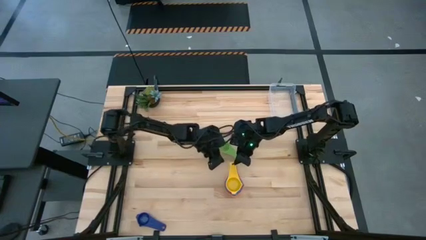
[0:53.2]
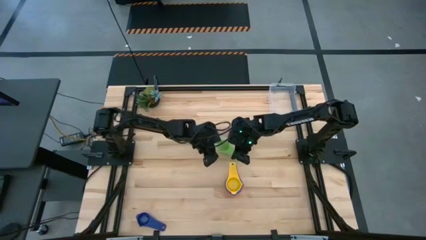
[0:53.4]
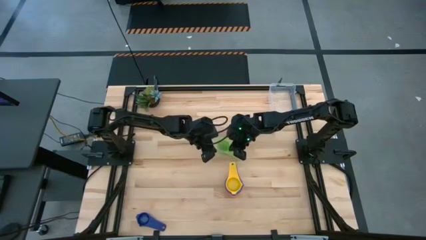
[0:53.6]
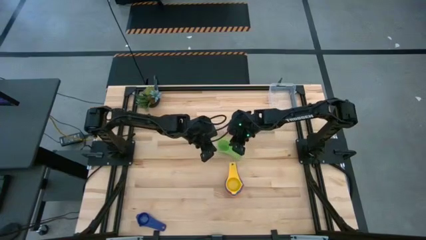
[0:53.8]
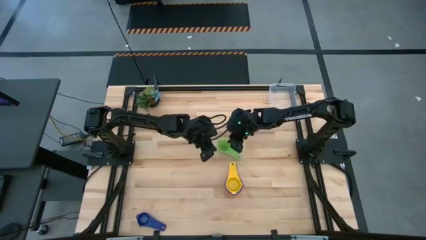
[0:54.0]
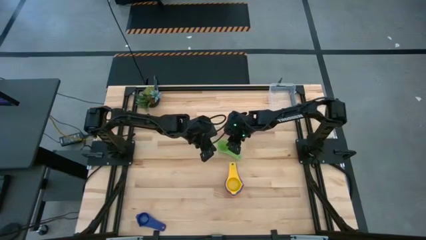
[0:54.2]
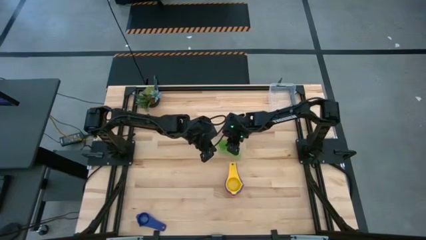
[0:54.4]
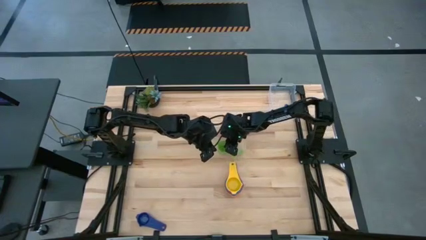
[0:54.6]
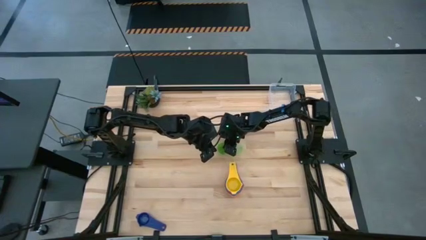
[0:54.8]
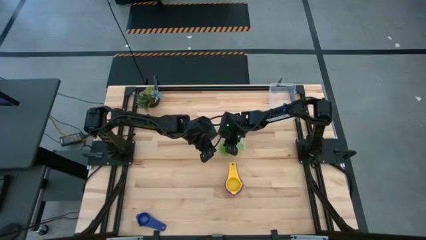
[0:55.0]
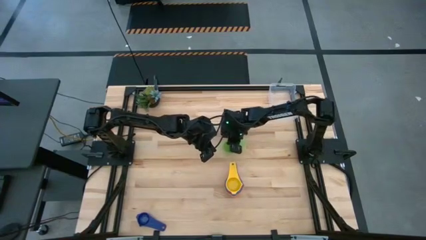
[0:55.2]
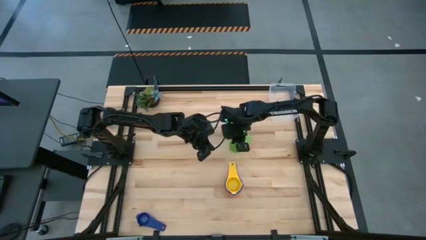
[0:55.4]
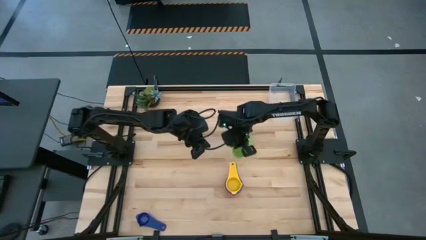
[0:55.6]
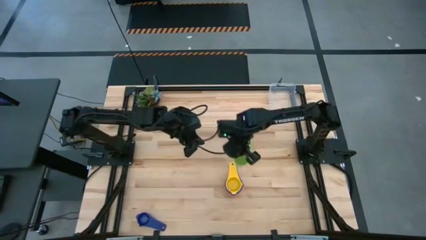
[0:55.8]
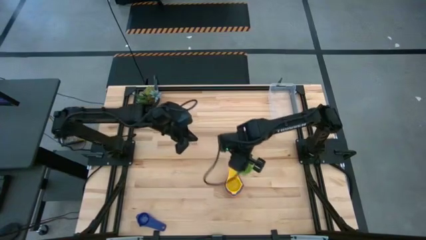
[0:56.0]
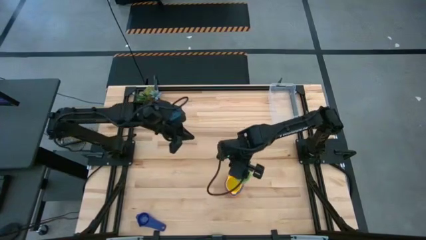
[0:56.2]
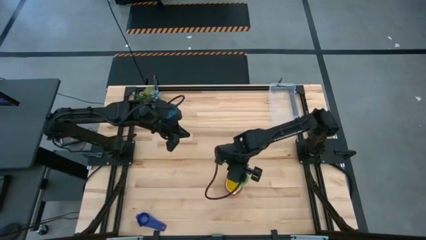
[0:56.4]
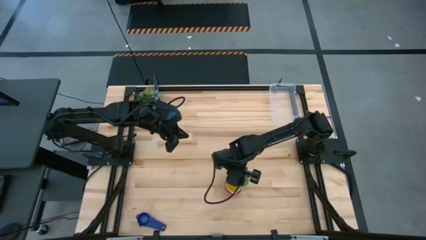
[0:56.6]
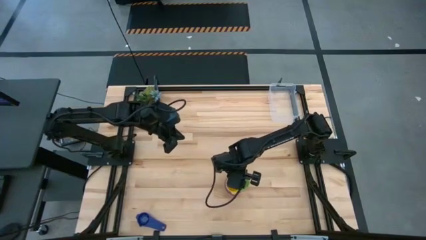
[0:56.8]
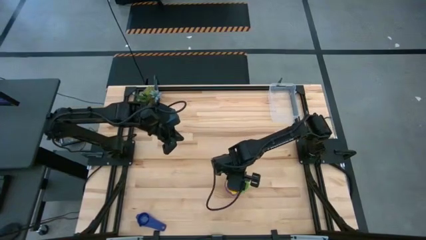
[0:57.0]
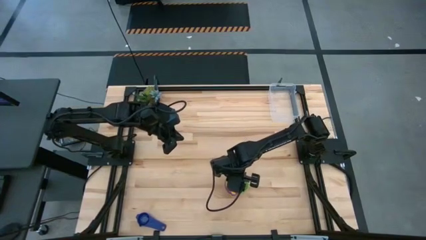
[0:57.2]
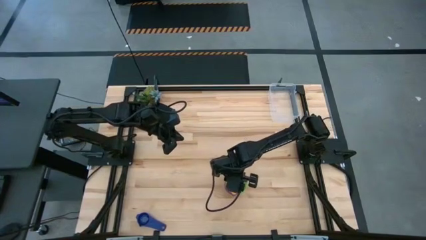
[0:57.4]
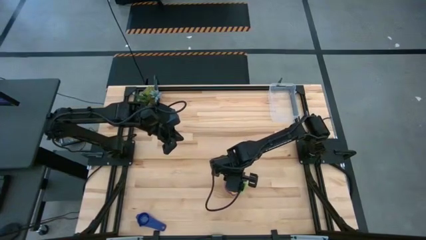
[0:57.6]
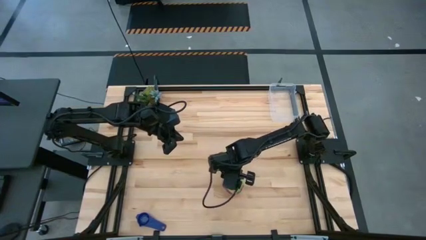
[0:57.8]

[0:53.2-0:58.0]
Task: Nest measuring cups in basket
Stack the green measuring cup on top of the yellow measuring cup

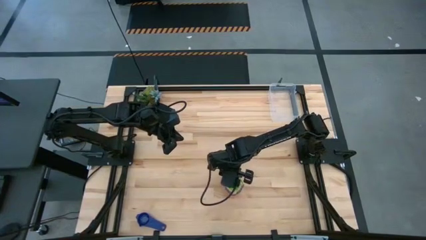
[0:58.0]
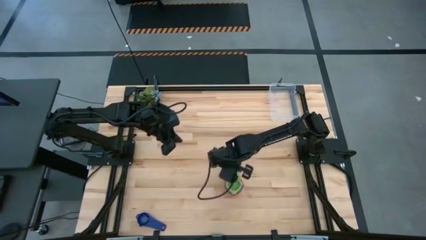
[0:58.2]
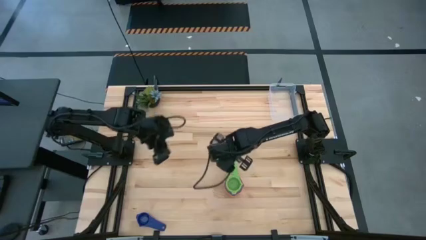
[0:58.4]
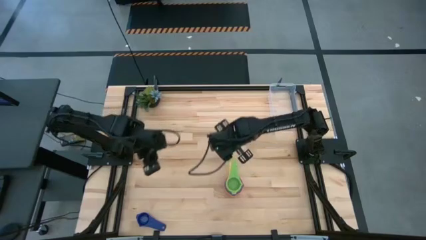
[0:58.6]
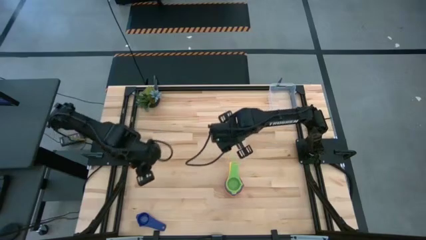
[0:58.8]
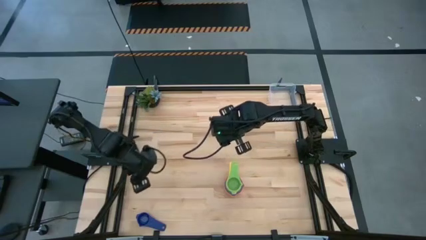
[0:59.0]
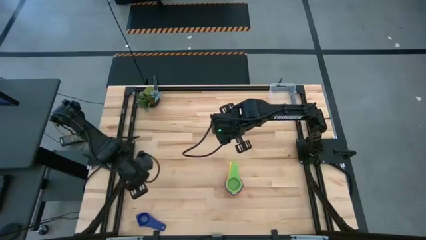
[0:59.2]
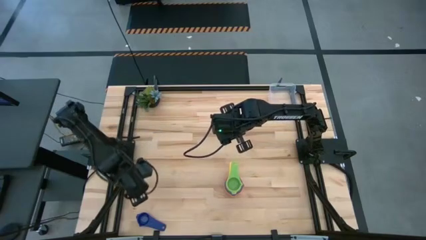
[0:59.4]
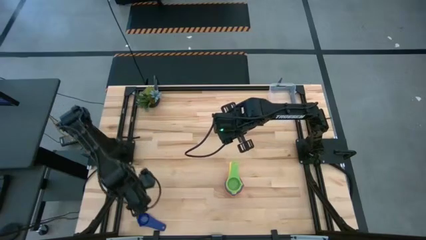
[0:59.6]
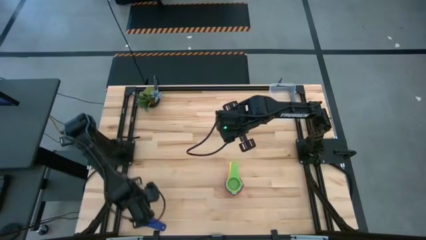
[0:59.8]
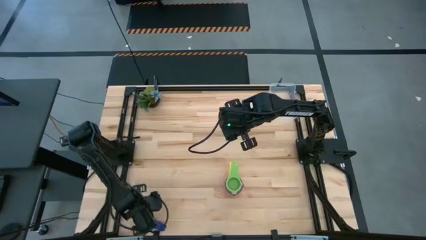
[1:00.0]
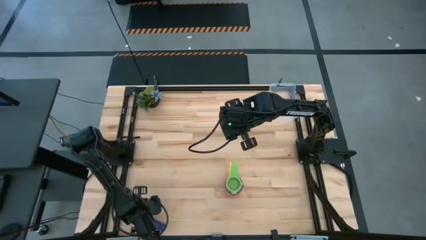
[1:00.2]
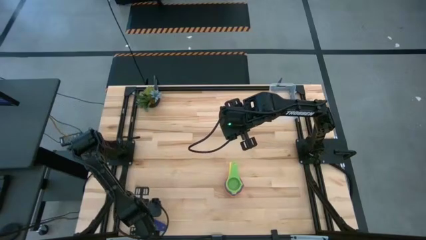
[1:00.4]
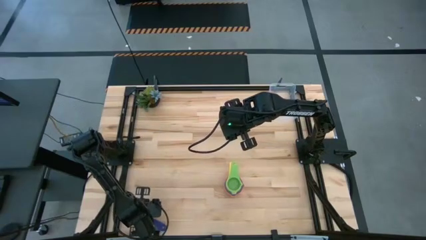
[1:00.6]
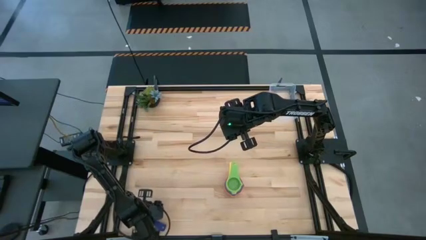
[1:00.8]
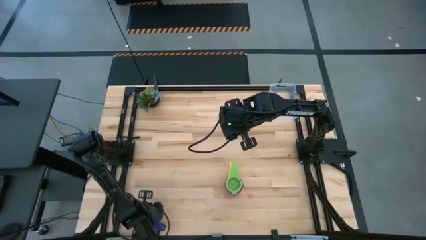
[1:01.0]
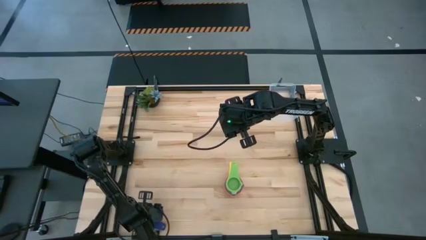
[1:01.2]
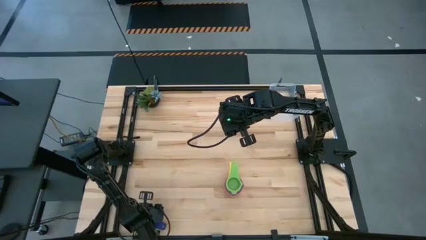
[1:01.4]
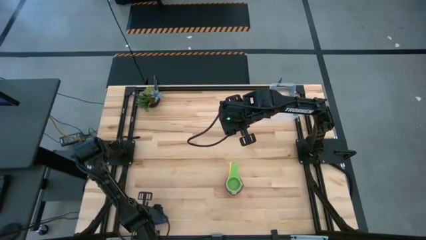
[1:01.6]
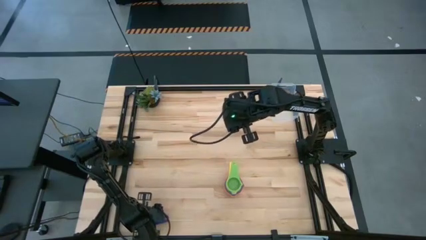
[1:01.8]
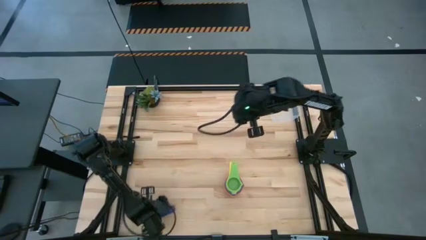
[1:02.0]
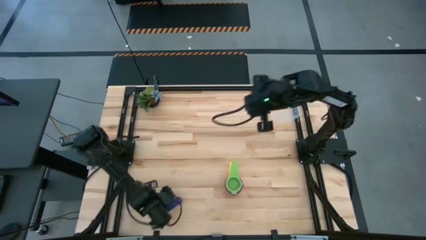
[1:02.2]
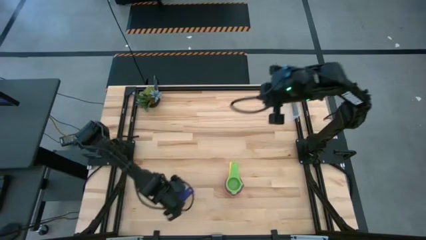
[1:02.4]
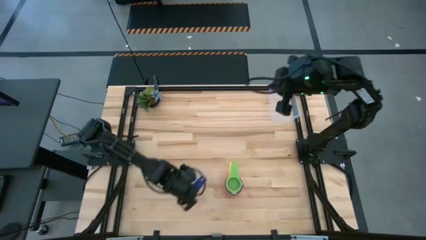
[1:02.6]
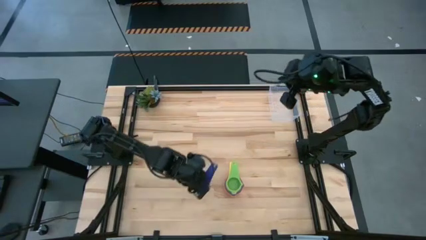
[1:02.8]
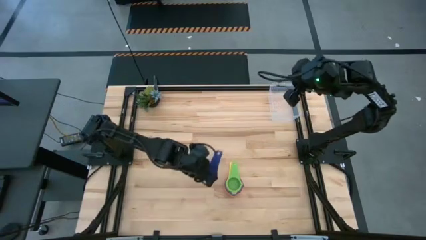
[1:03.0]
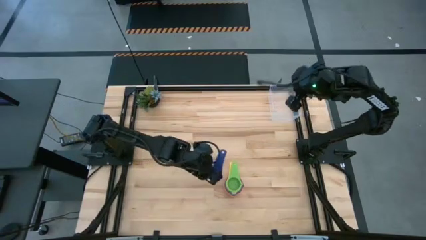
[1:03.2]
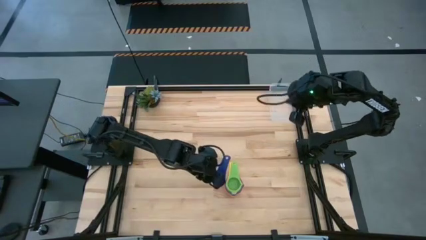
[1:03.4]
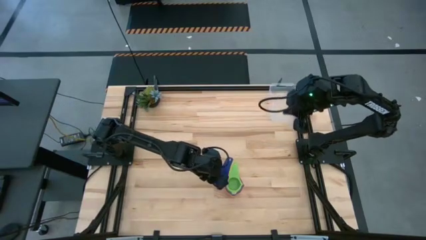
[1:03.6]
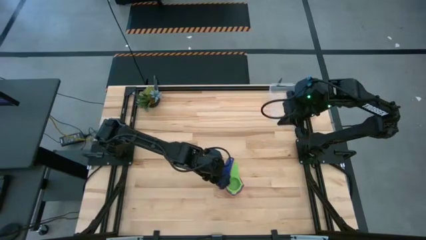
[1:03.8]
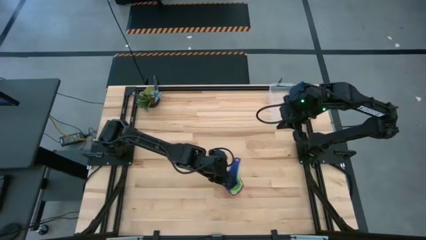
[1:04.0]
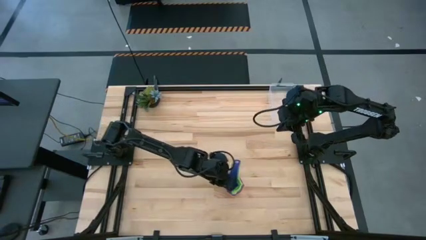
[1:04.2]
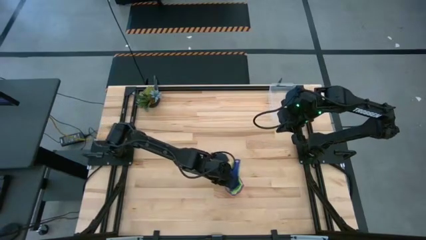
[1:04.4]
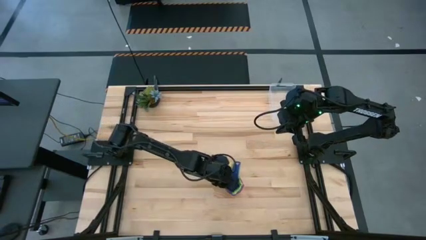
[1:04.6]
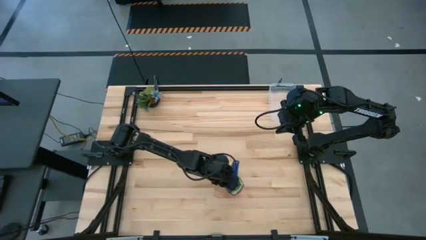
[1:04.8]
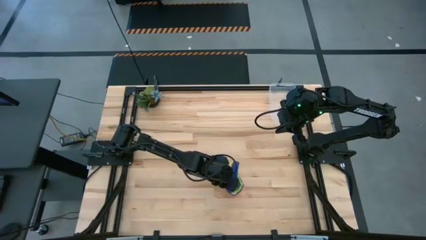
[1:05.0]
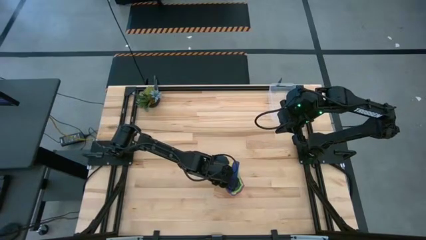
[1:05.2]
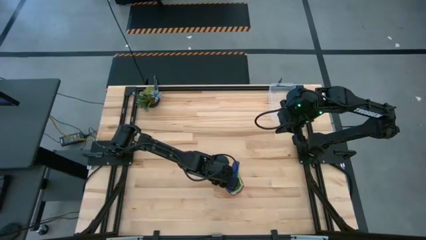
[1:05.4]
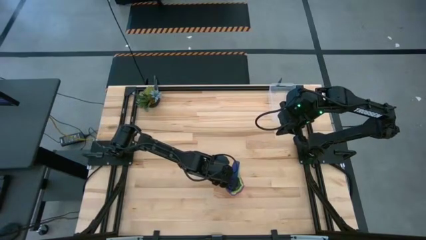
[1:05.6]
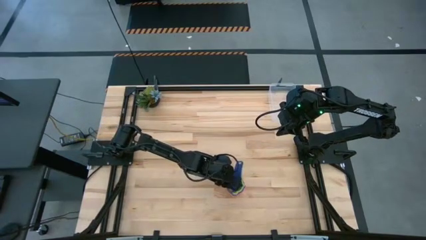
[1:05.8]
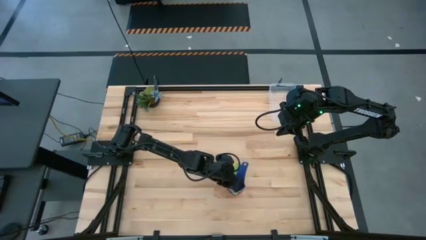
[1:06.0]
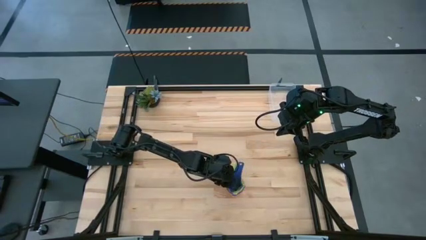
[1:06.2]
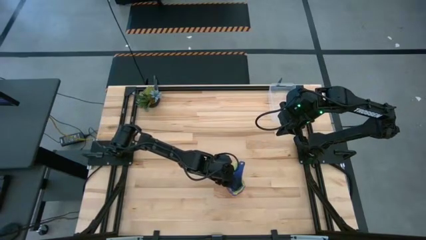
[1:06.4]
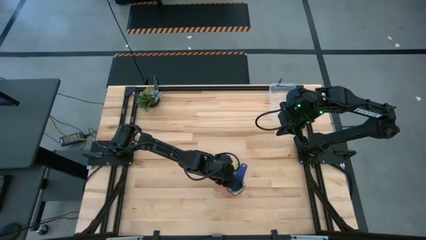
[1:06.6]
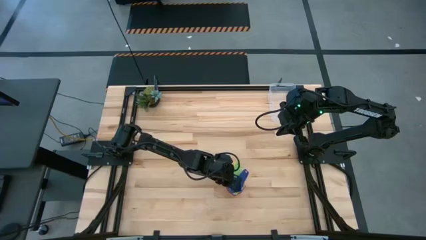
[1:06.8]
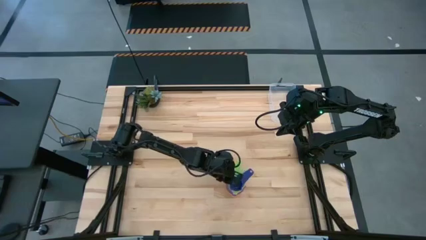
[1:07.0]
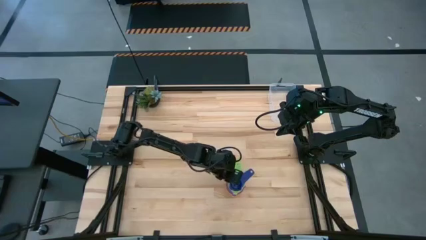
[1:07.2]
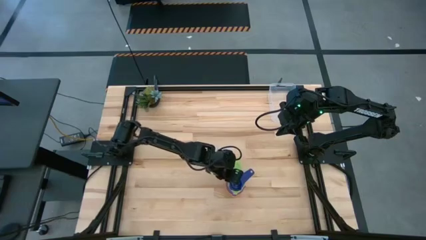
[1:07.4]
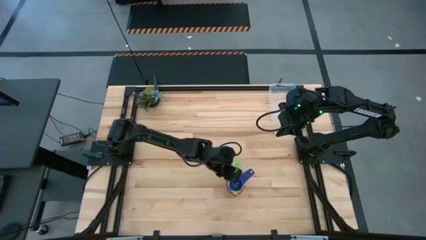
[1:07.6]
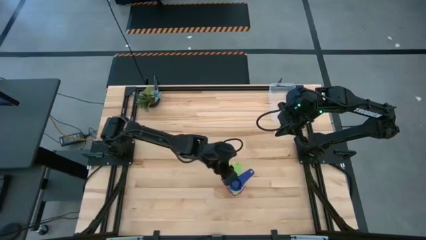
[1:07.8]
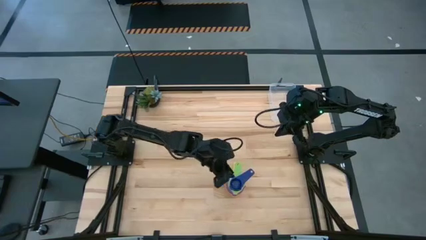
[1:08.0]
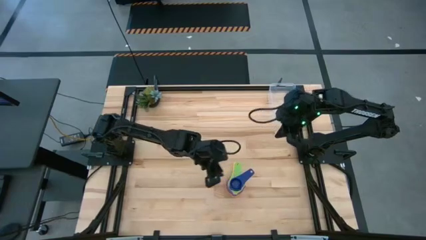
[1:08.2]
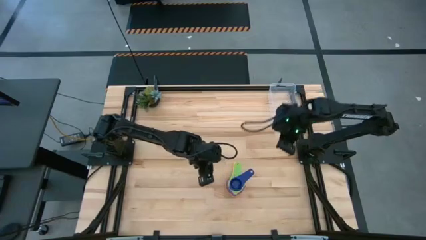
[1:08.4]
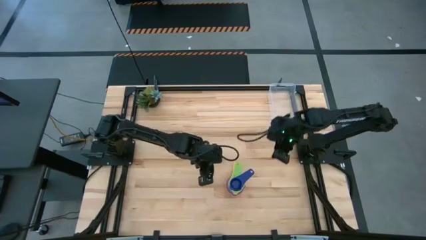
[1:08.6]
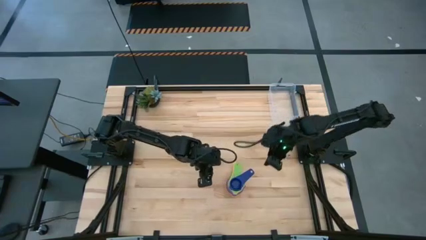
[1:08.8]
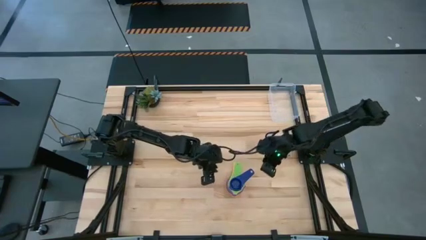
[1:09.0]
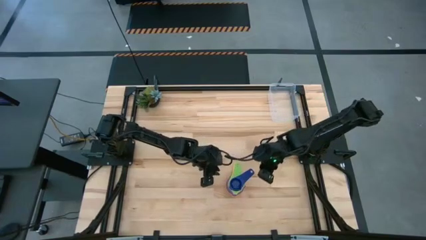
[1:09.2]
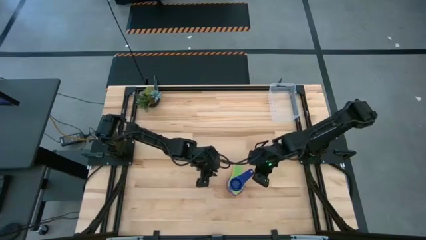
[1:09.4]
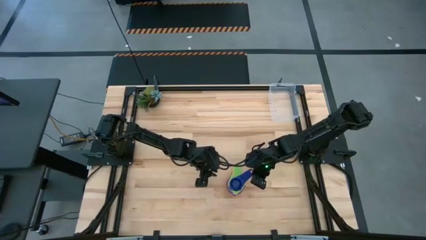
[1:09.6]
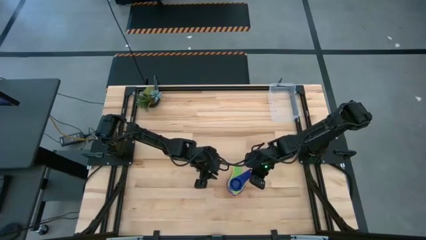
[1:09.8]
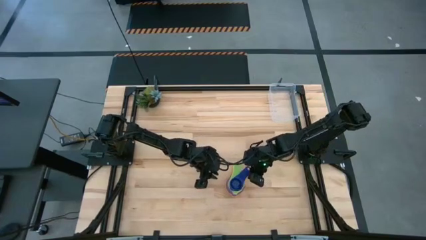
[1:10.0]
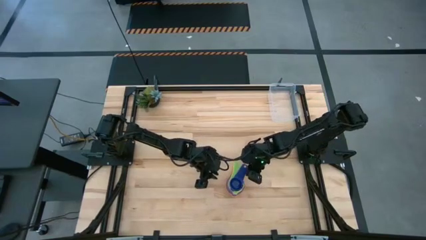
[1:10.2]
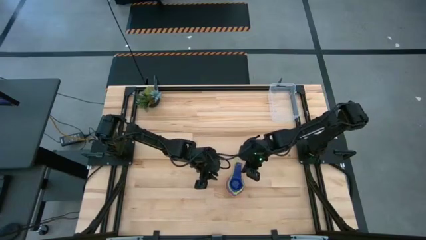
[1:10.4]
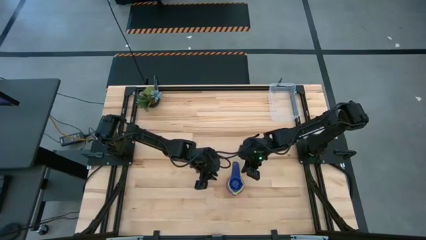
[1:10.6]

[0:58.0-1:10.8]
Stack the dark blue measuring cup on top of the green measuring cup
